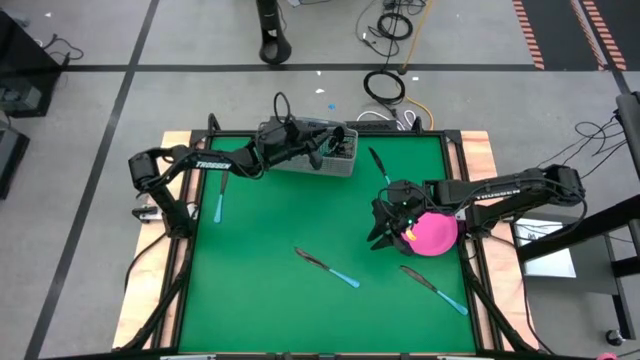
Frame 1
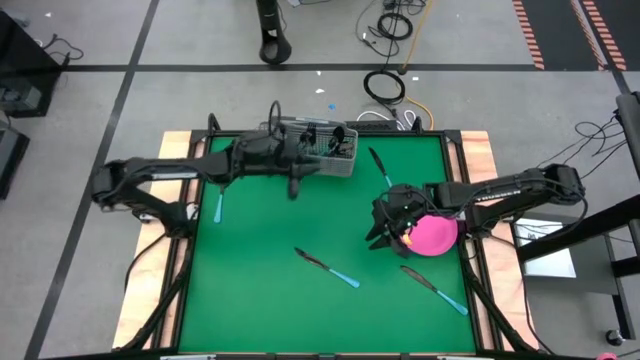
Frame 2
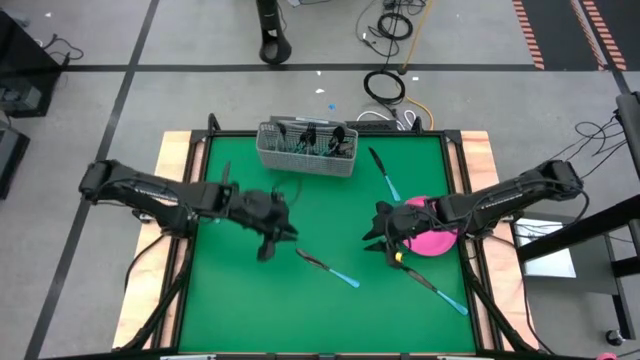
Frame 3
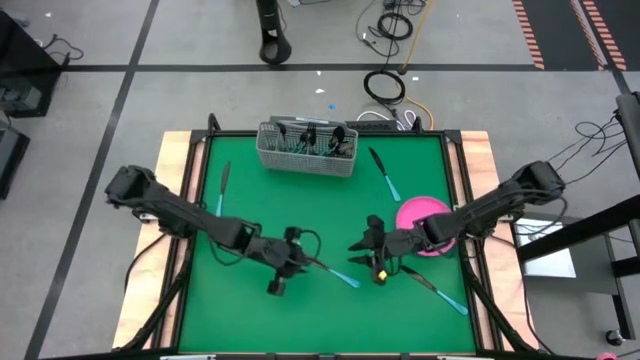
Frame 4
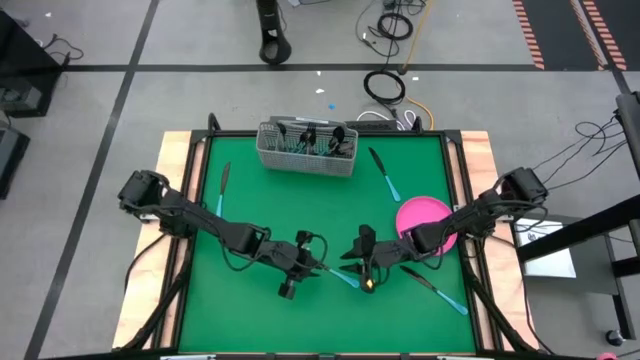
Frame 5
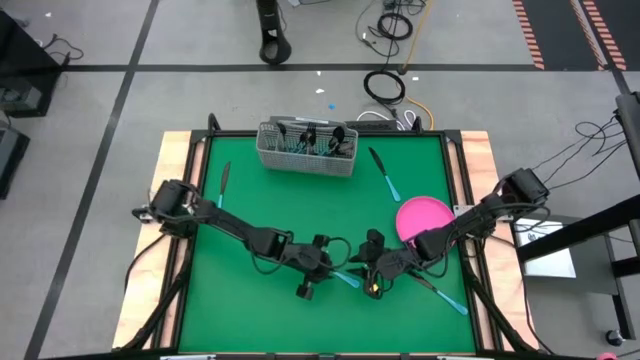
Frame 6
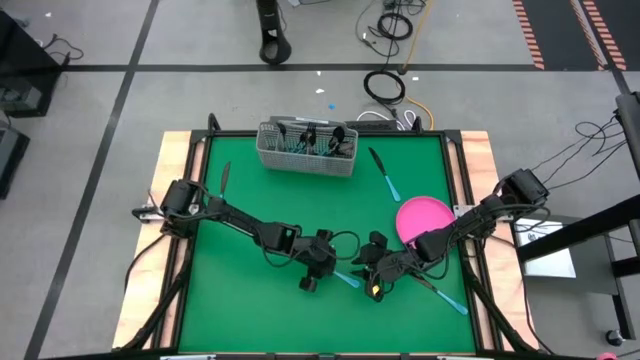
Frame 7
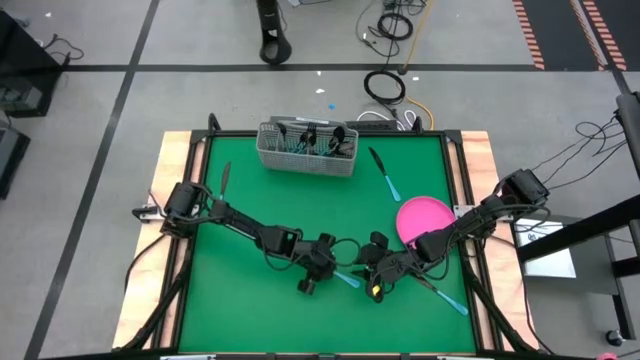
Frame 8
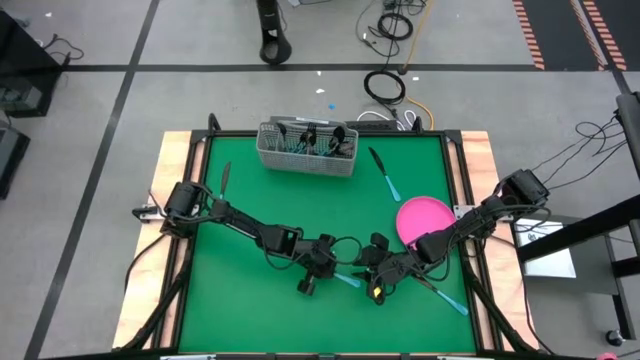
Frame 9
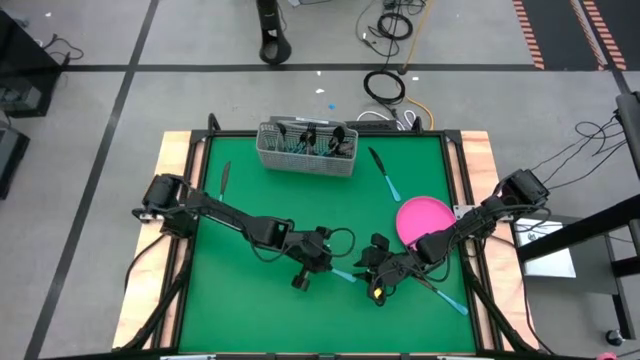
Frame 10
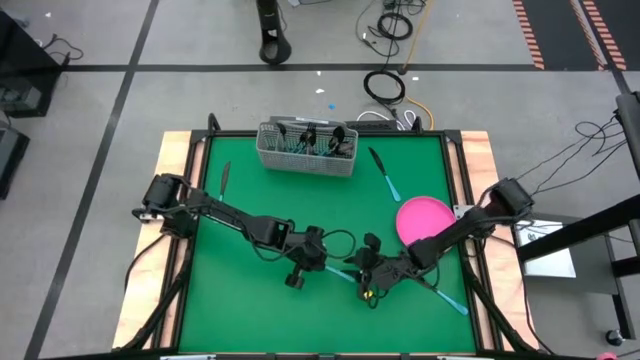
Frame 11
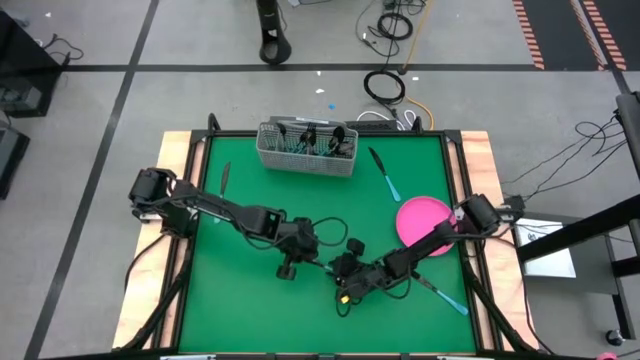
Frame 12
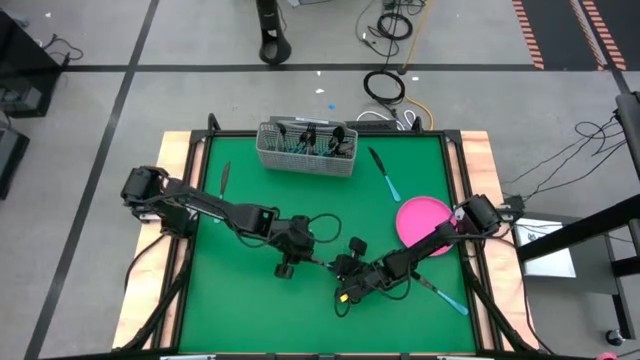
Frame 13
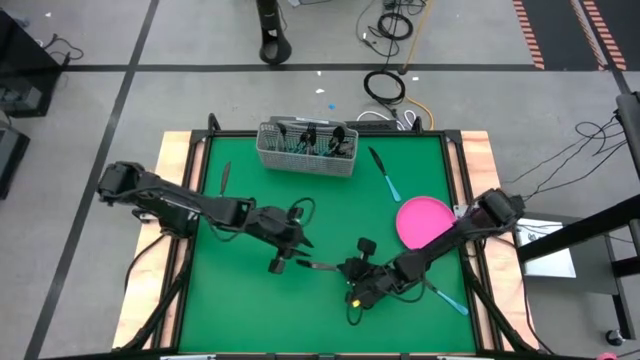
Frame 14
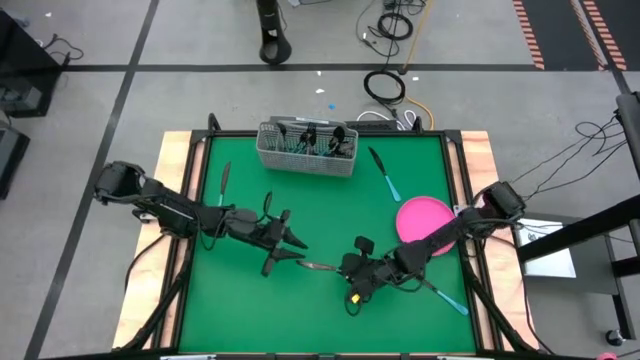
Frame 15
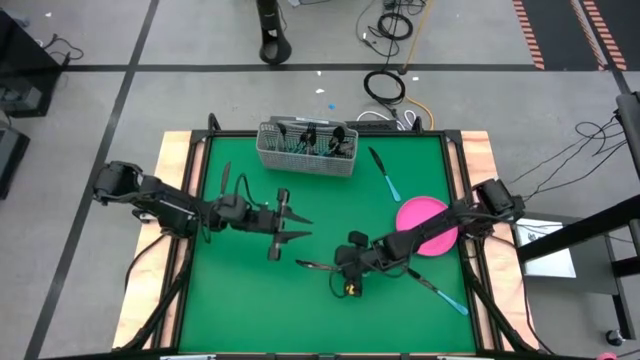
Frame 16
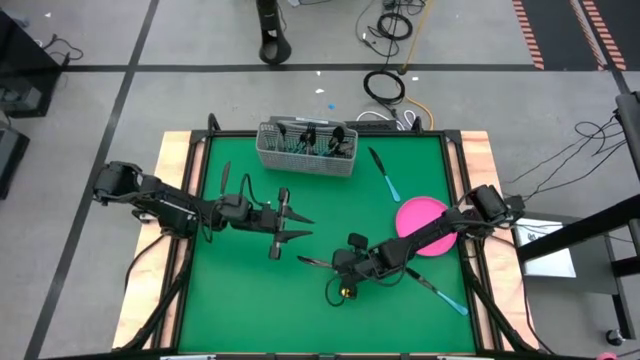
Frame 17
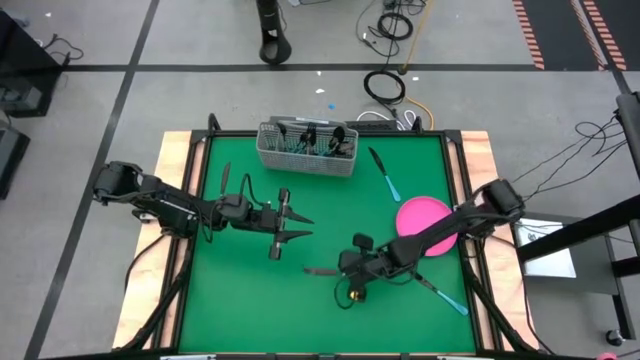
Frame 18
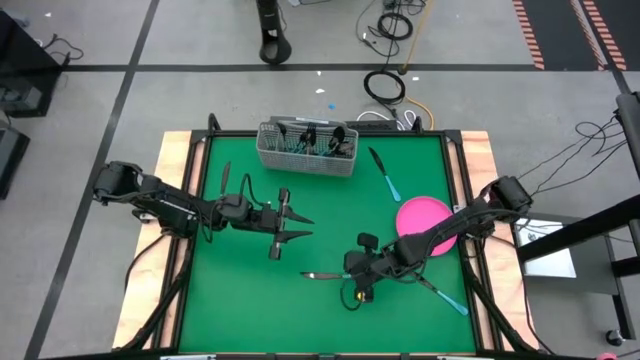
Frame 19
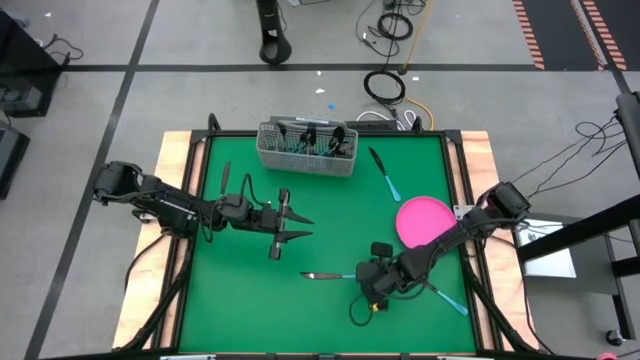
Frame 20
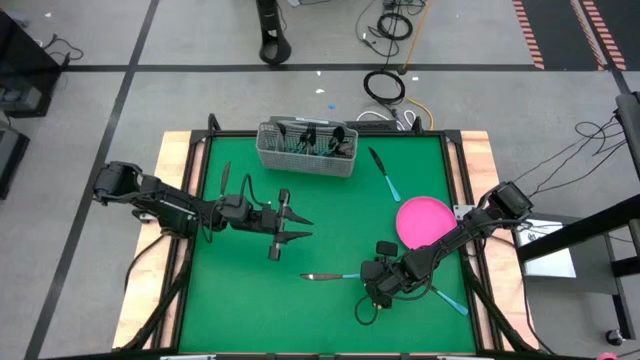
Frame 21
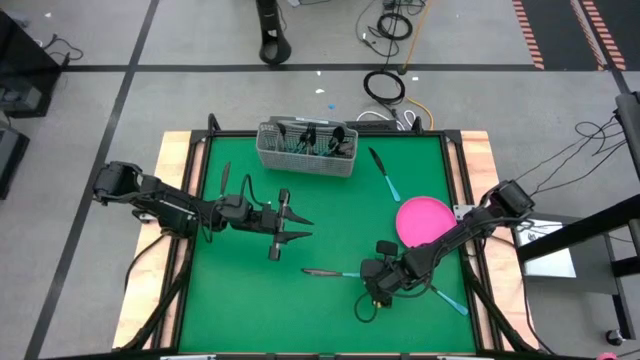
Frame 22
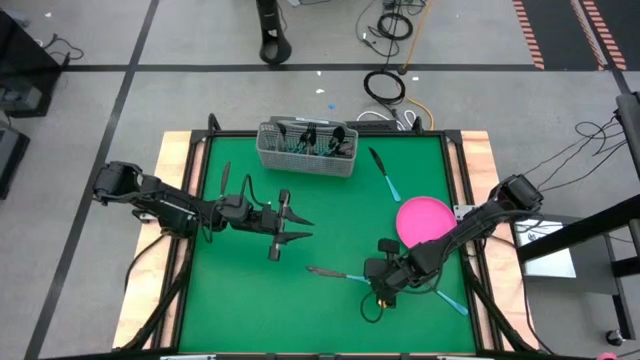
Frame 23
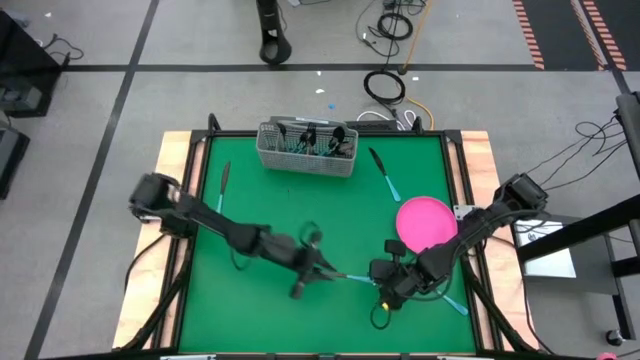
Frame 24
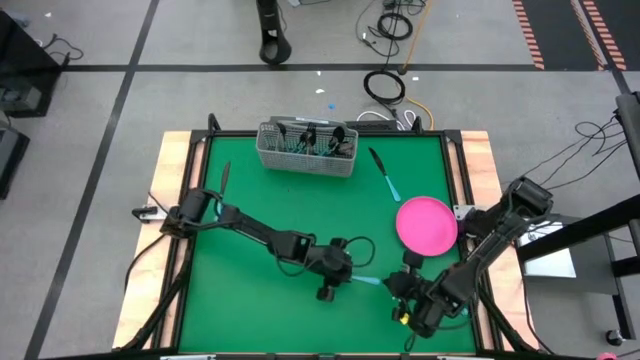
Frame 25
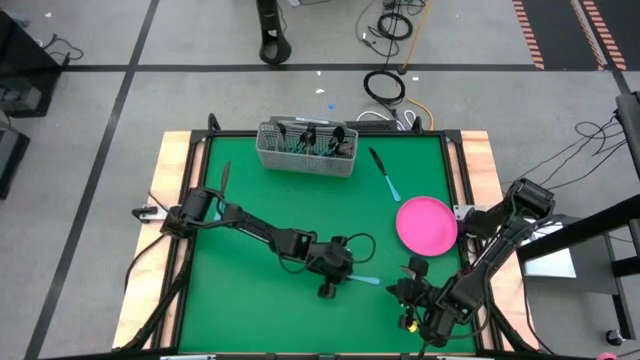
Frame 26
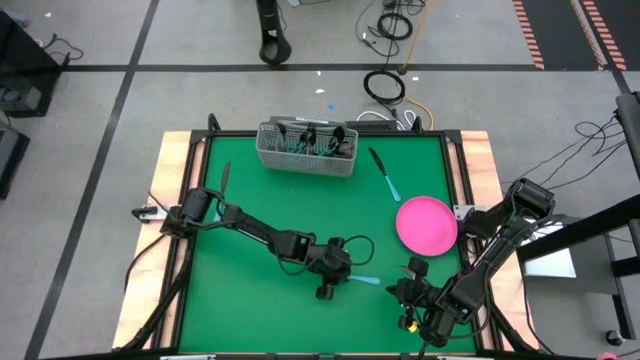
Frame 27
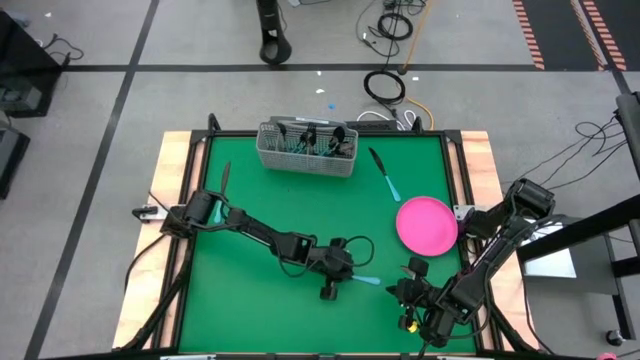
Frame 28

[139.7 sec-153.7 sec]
Task: Sort silverware
Put the blue table knife into the silverware tray

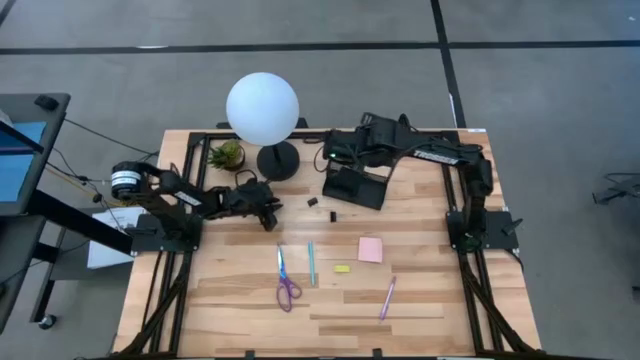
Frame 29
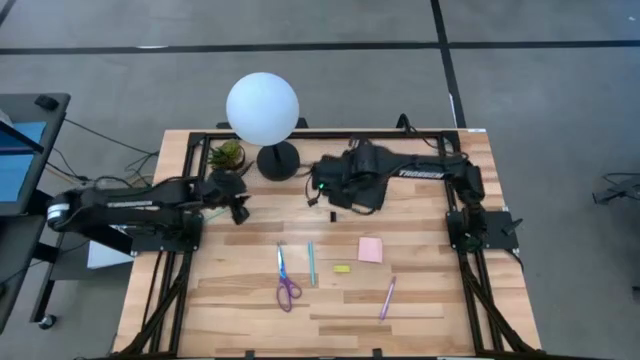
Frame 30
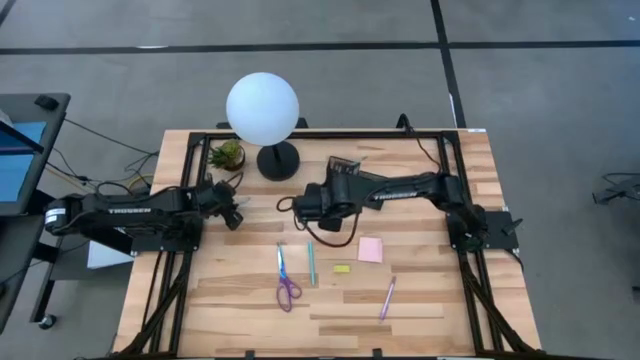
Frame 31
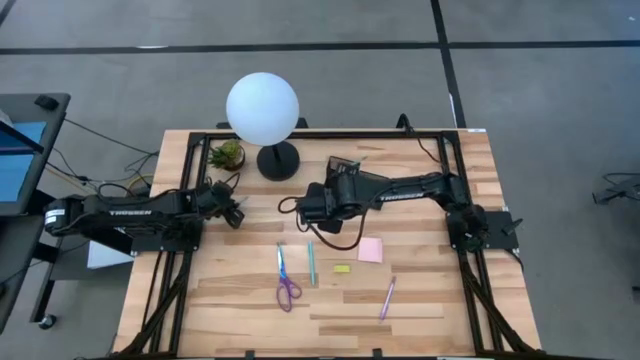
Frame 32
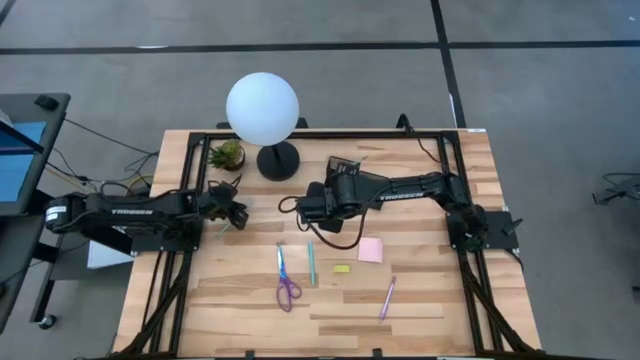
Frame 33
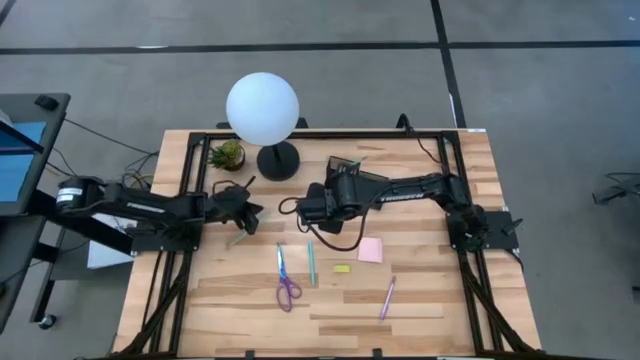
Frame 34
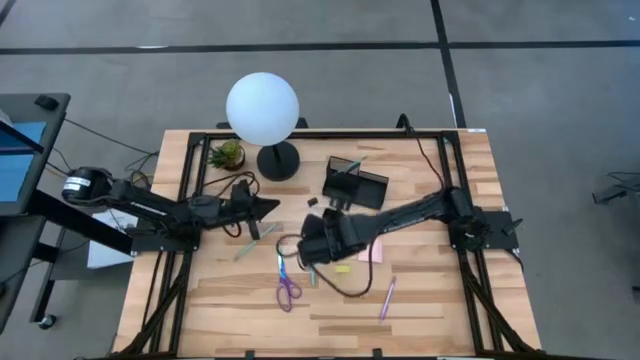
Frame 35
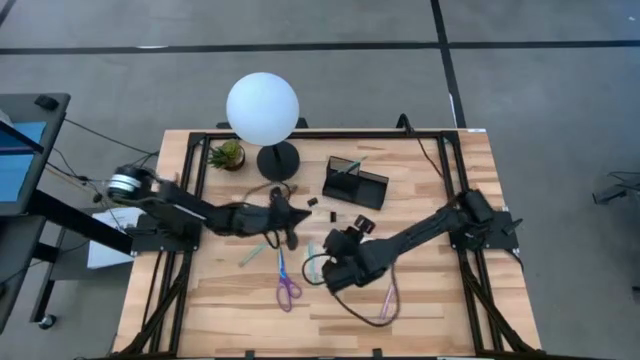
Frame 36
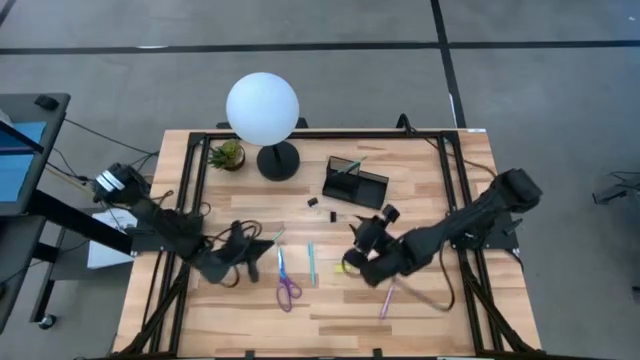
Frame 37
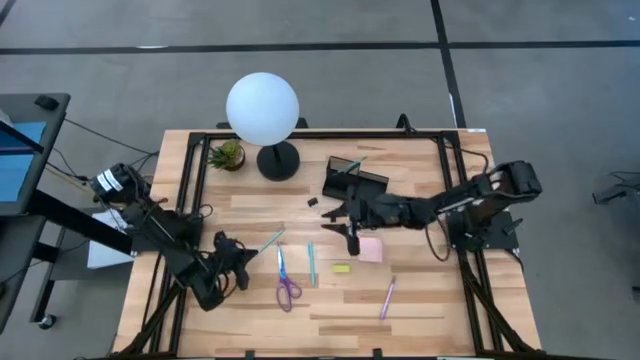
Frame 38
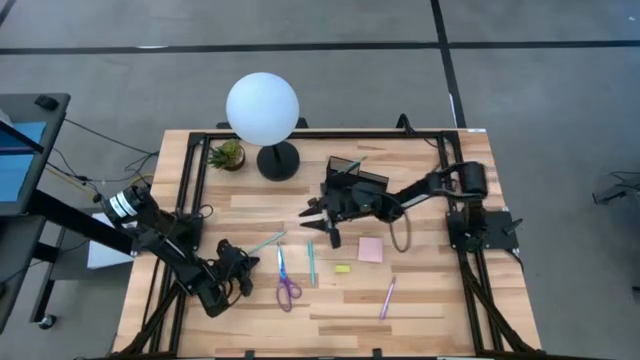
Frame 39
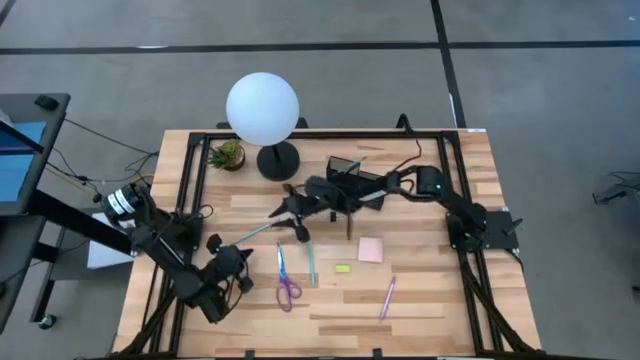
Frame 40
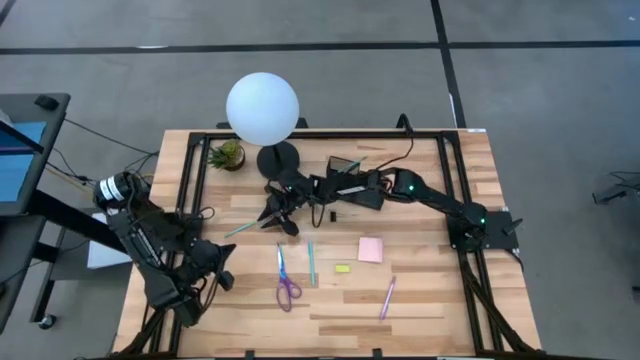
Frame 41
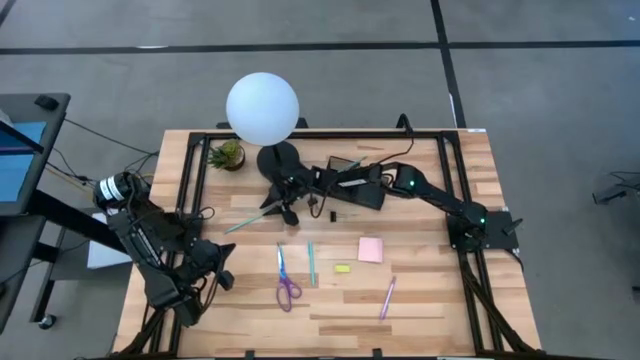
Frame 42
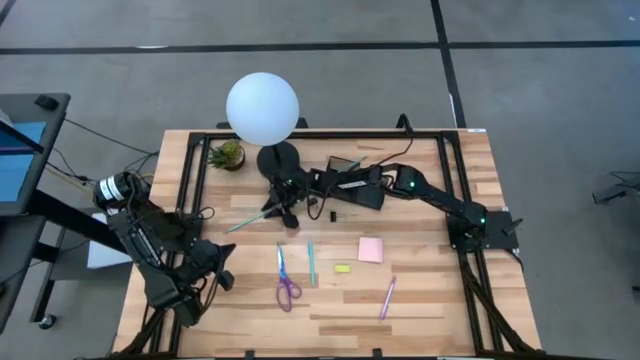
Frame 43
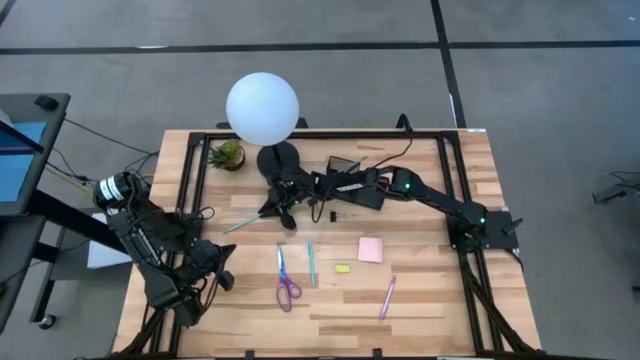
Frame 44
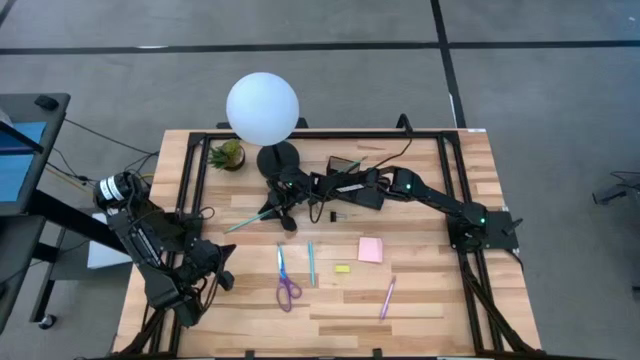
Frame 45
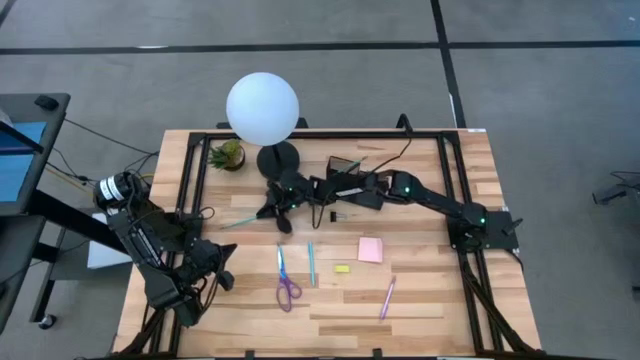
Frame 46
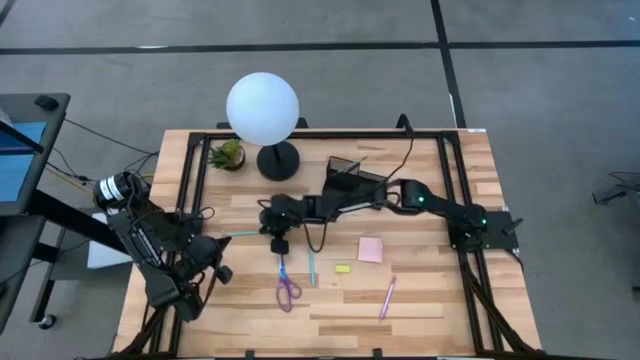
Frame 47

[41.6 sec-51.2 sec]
Task: Pick and place office supplies into organizer
Put the blue pencil into the black desk organizer
